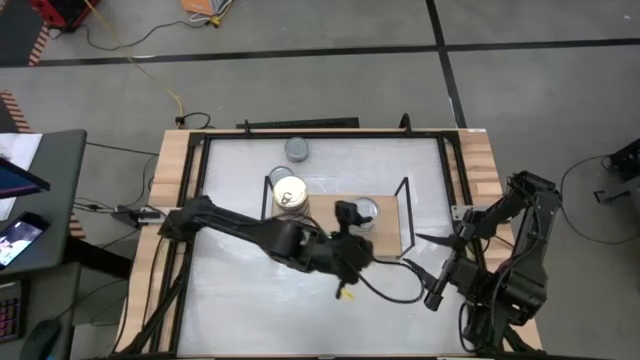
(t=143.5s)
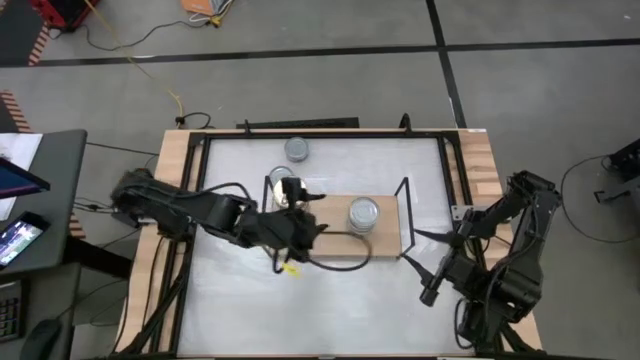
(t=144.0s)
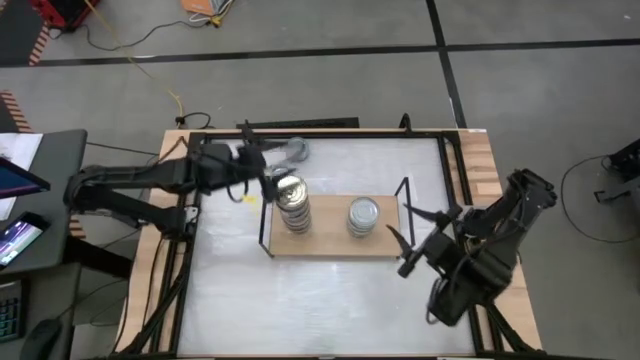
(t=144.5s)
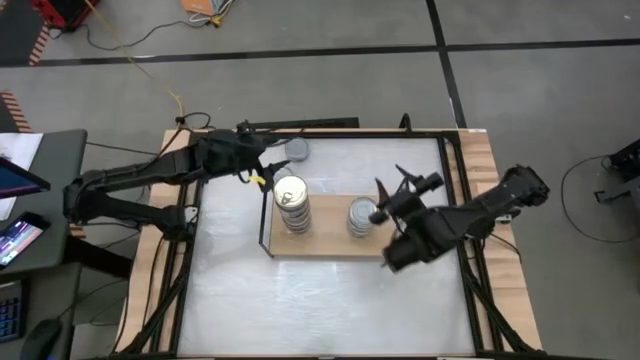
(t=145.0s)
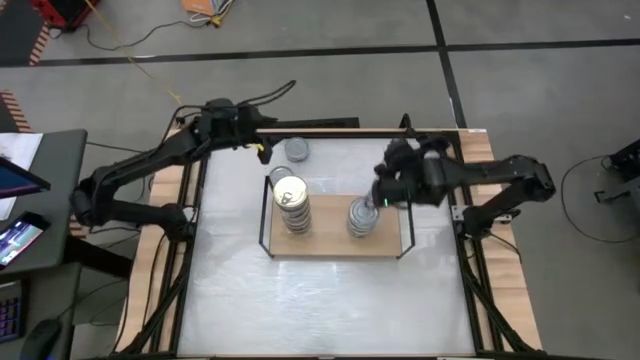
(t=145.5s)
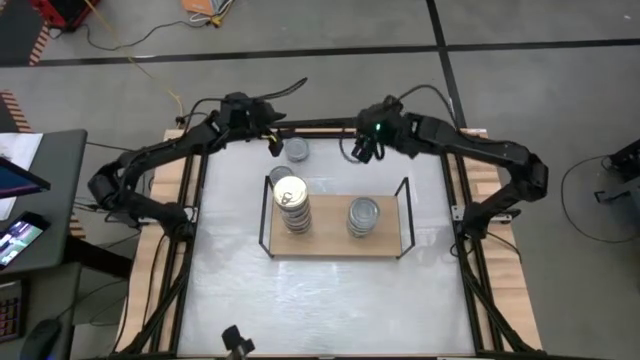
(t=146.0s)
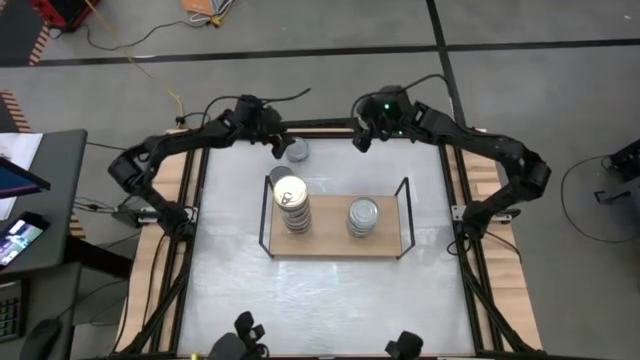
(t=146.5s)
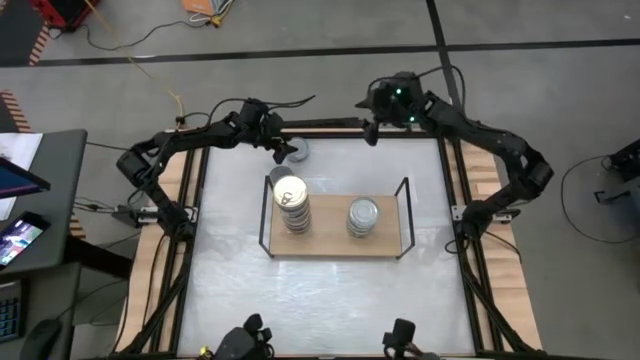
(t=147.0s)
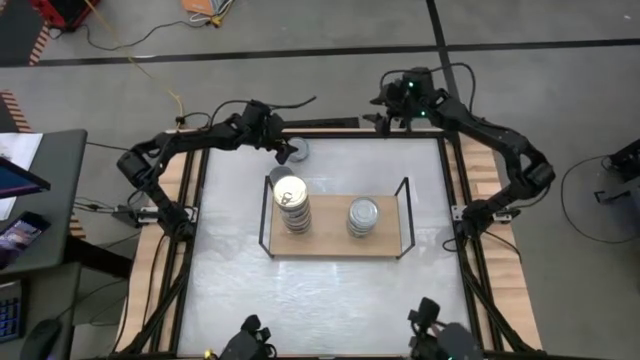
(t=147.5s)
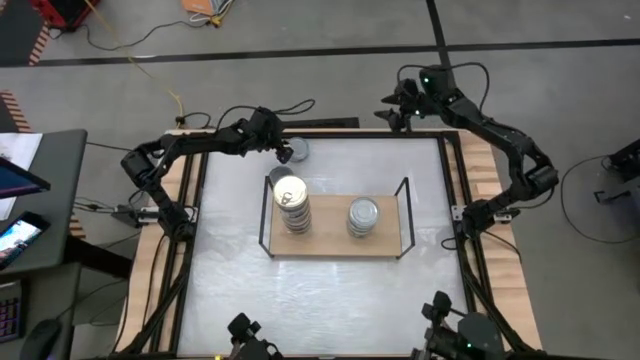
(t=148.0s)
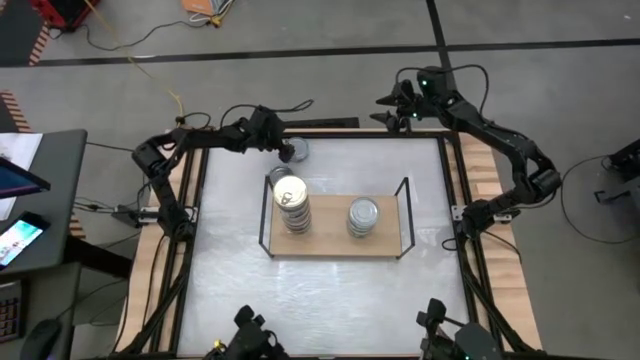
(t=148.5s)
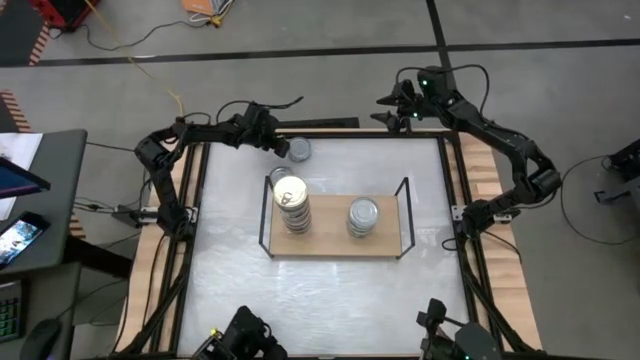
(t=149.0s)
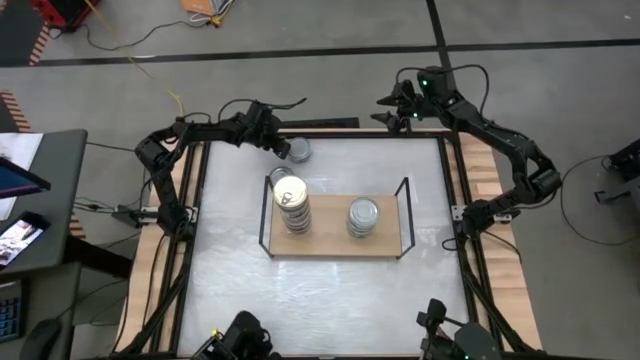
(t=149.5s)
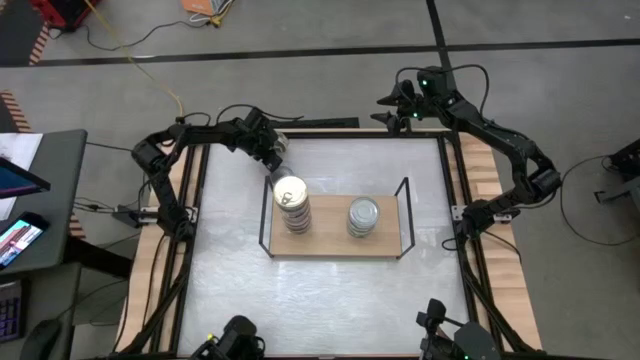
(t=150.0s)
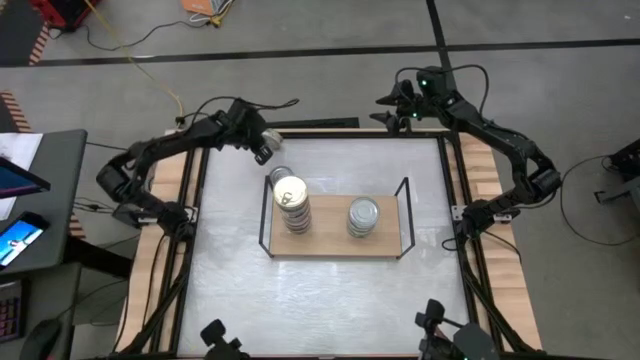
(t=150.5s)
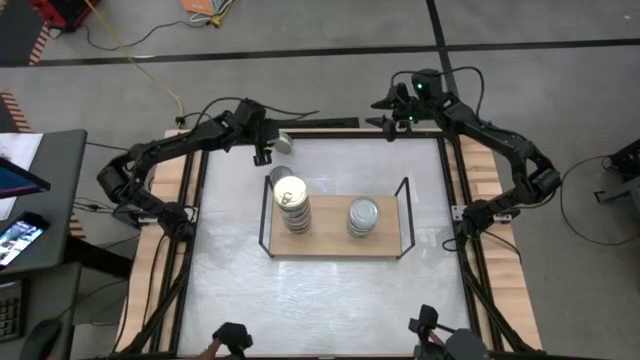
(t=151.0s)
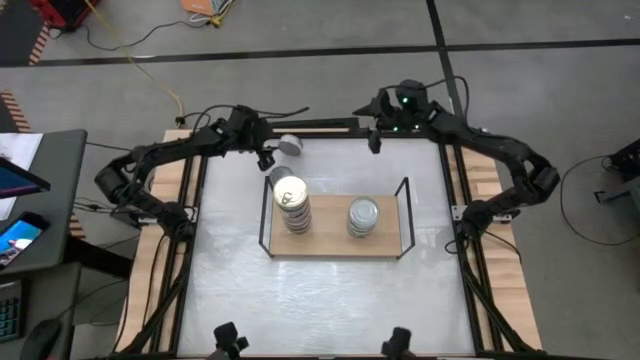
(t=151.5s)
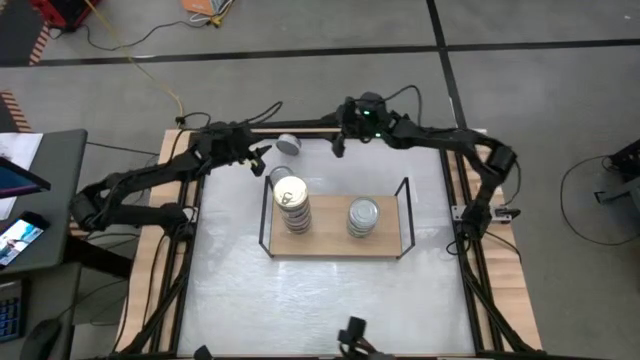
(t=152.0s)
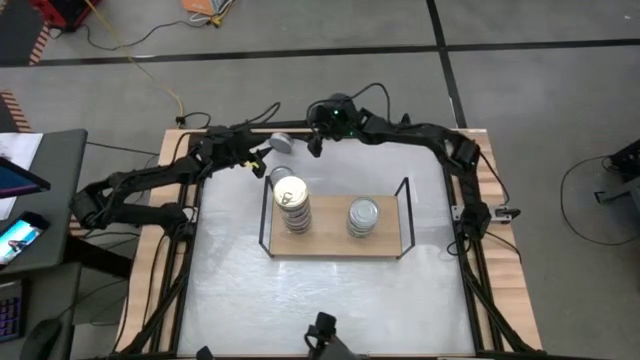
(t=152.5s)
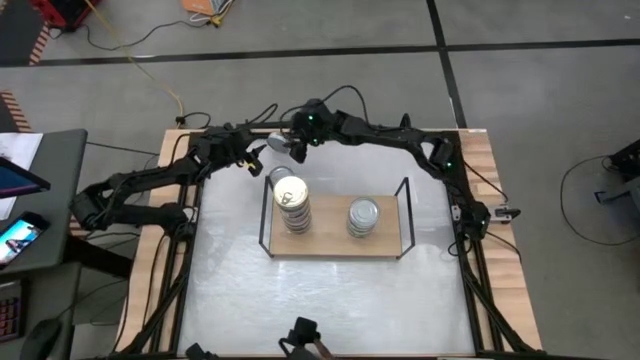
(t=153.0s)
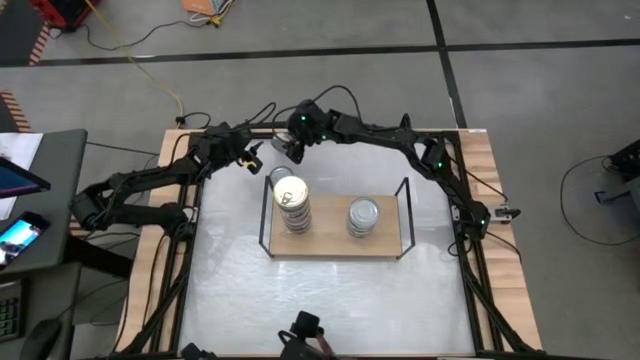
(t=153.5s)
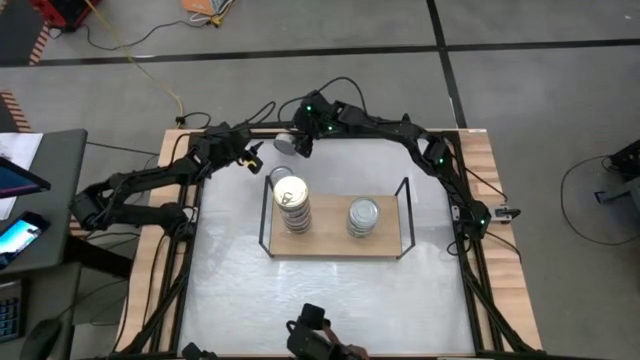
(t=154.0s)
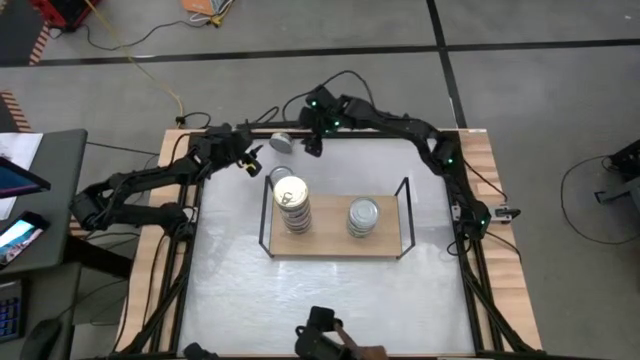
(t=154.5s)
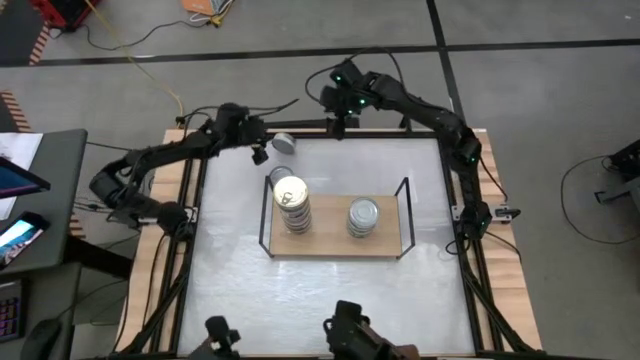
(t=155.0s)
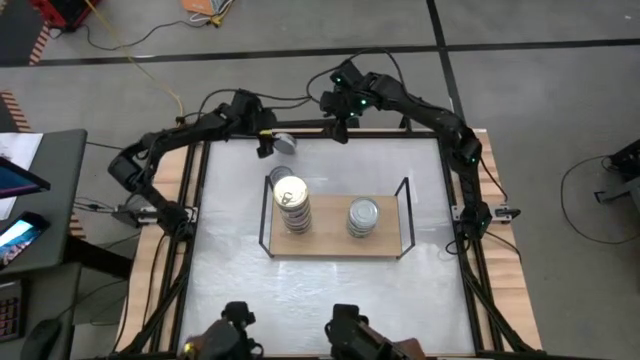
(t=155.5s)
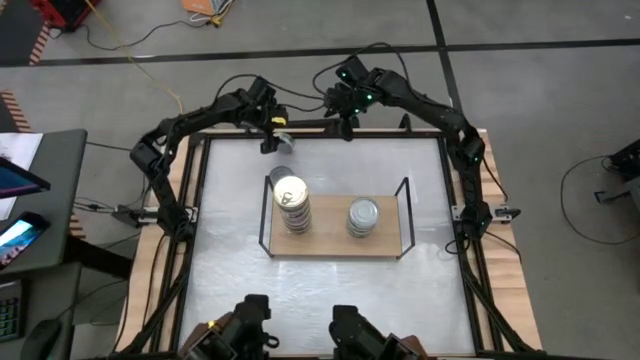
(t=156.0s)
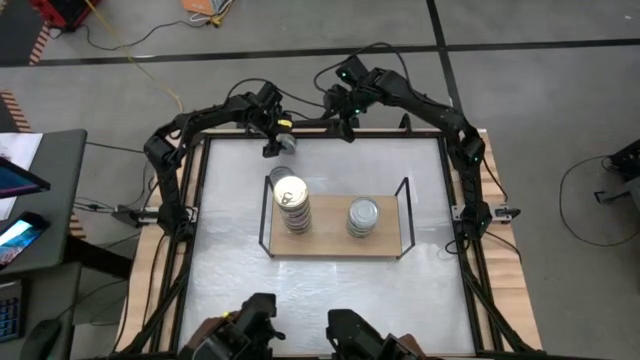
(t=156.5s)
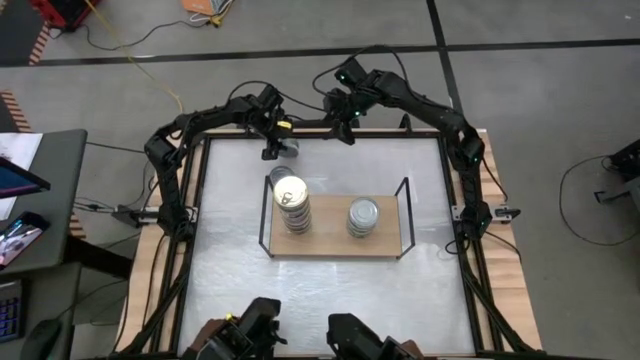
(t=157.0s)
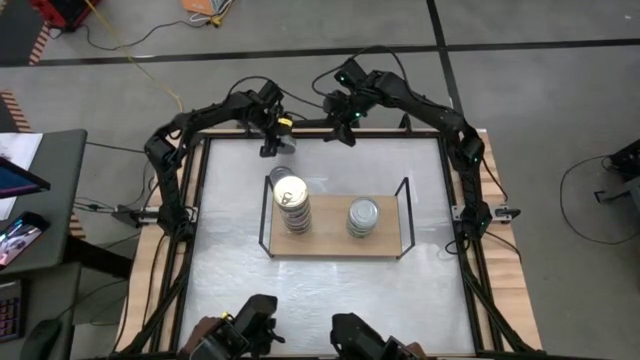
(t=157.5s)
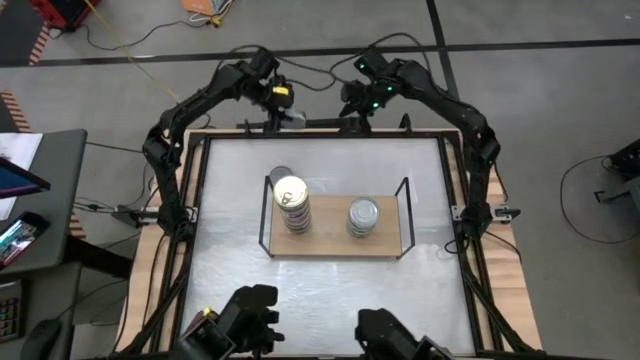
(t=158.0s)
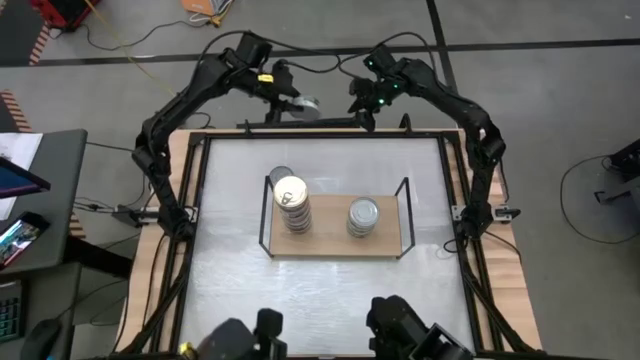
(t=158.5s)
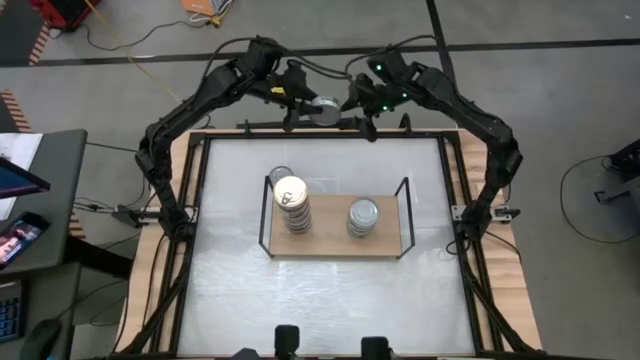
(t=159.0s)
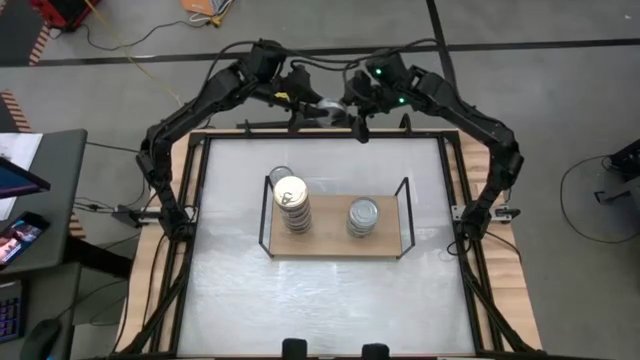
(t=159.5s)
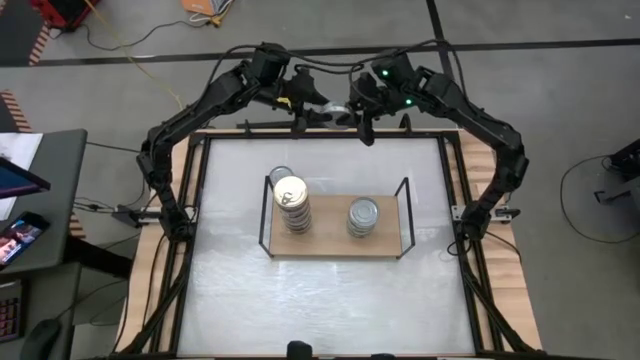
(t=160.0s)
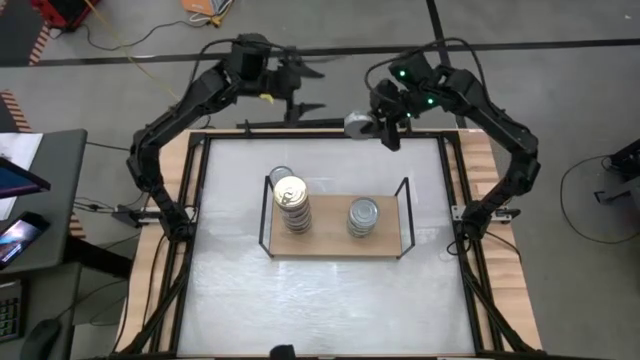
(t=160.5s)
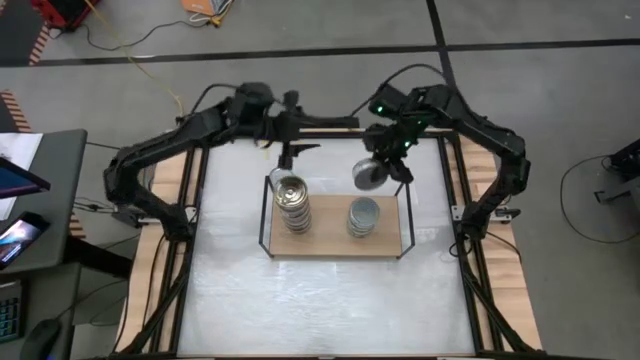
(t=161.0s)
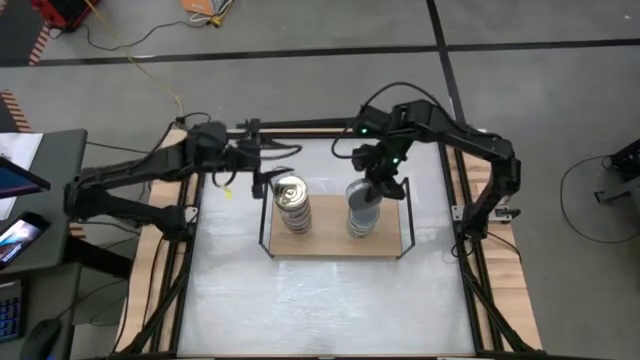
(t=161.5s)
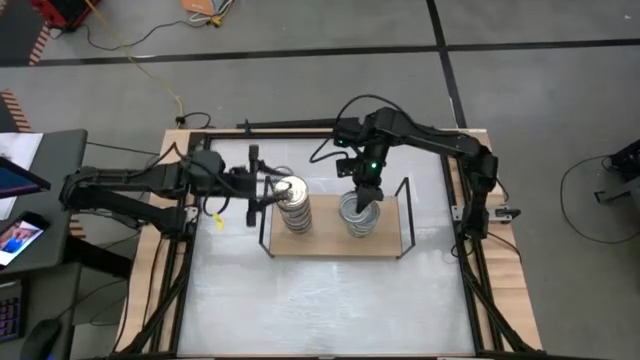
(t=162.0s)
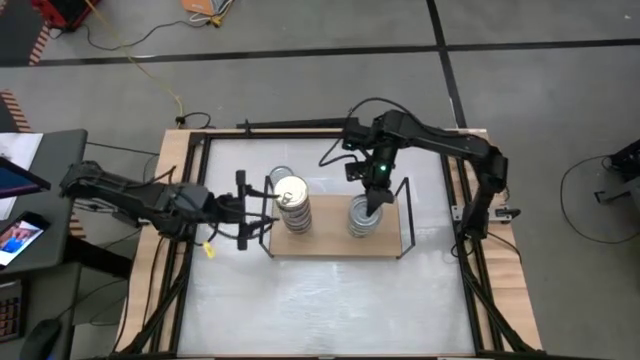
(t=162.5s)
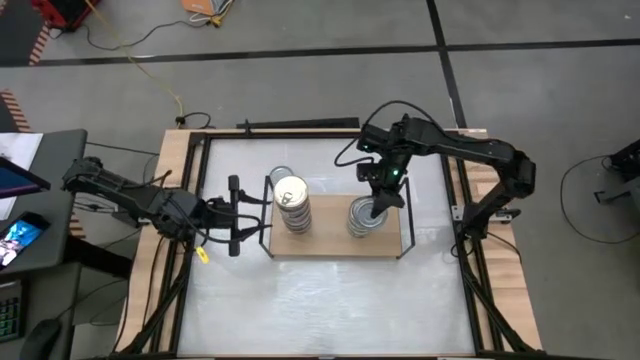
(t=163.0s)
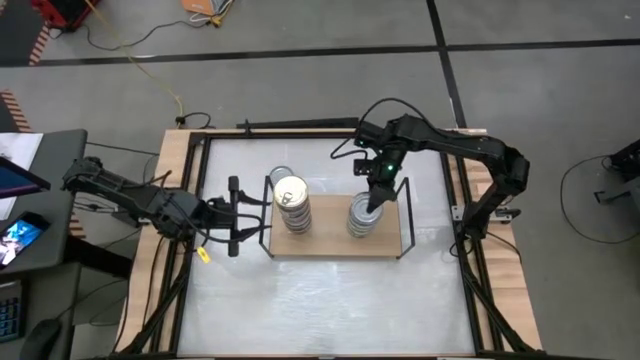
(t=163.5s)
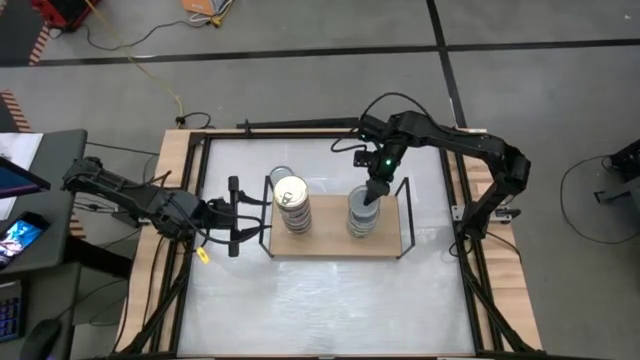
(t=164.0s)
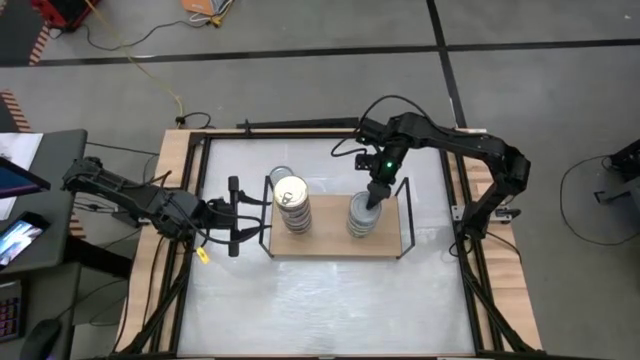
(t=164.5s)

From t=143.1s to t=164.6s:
Task: Stack canned seafood by type on shelf
Stack the green tuna can on top of the green tuna can on the shelf
